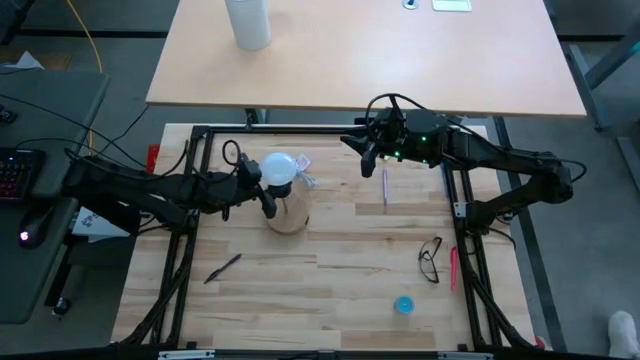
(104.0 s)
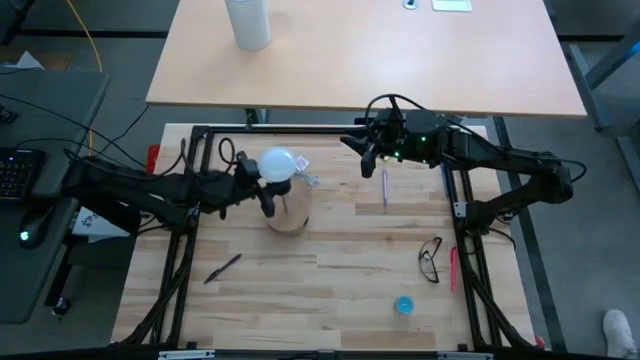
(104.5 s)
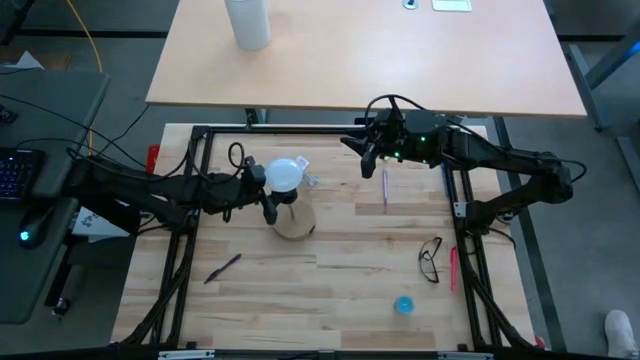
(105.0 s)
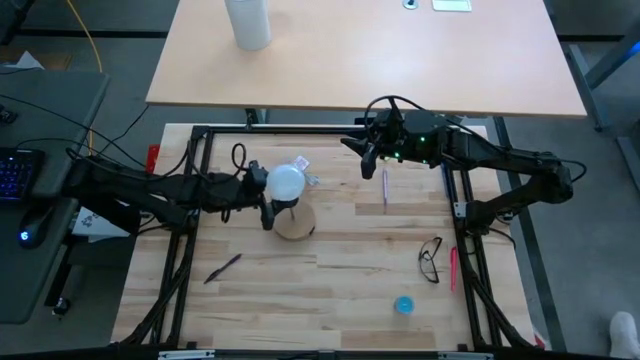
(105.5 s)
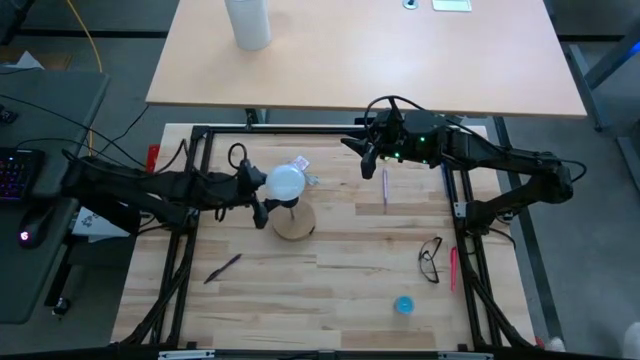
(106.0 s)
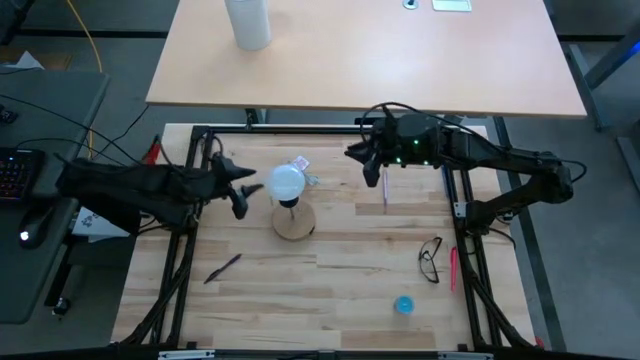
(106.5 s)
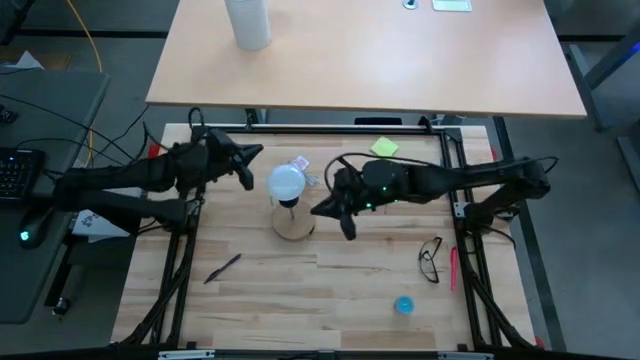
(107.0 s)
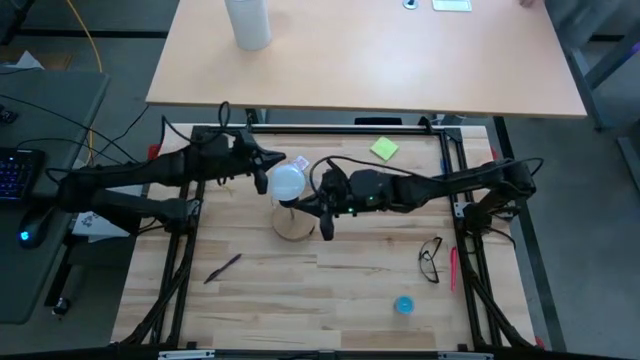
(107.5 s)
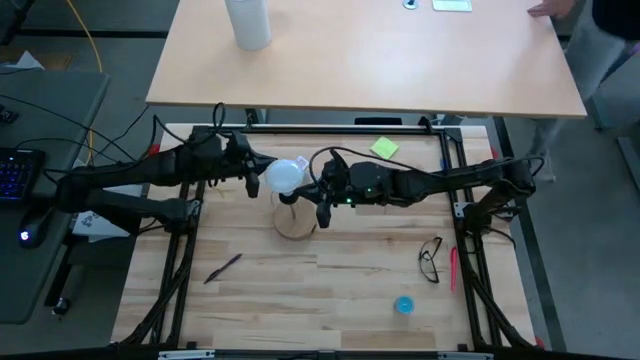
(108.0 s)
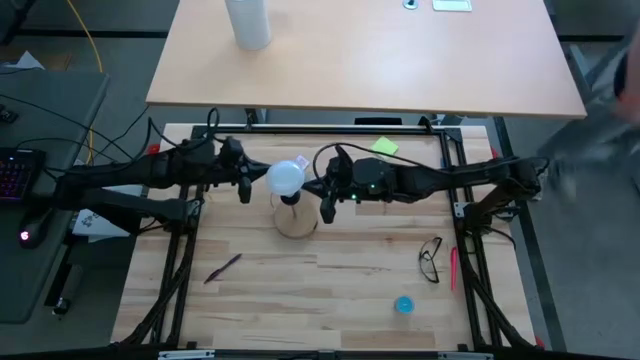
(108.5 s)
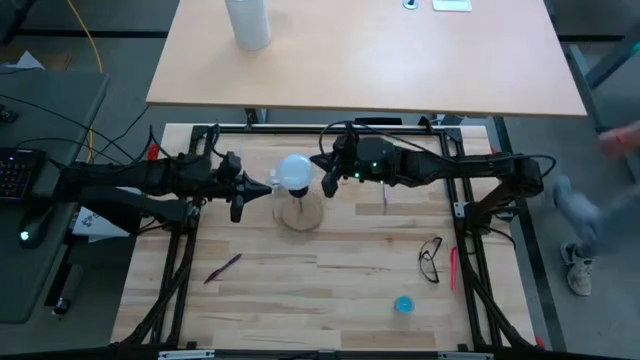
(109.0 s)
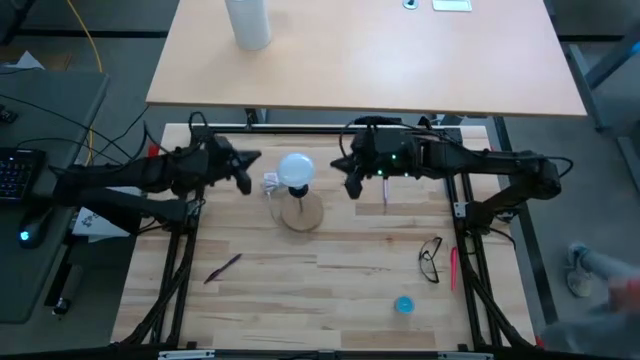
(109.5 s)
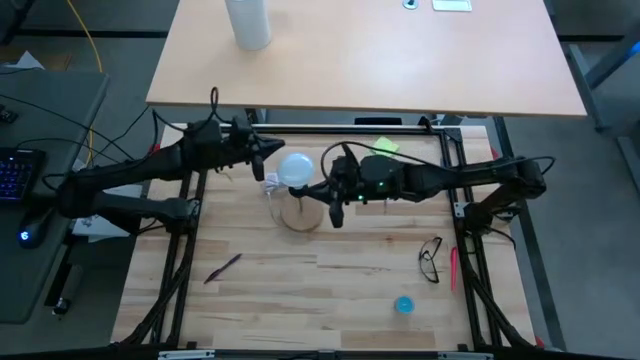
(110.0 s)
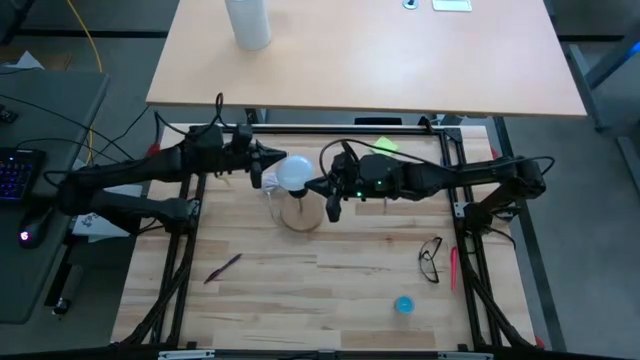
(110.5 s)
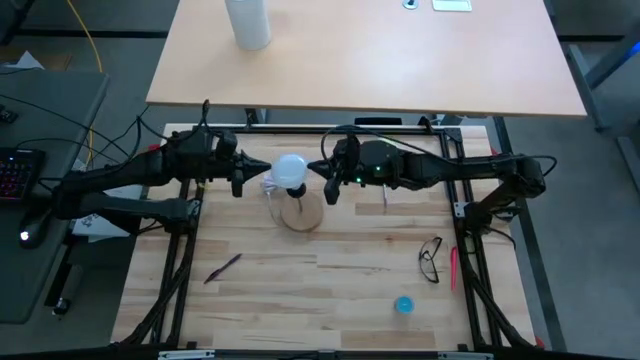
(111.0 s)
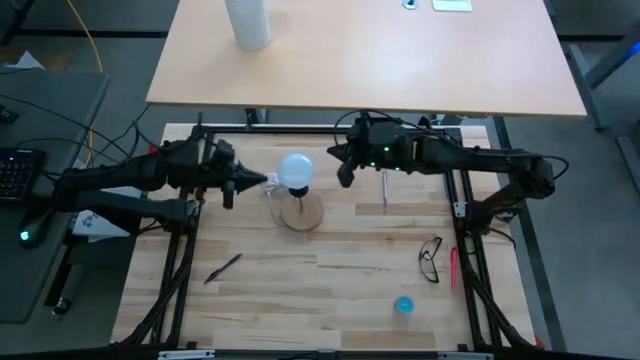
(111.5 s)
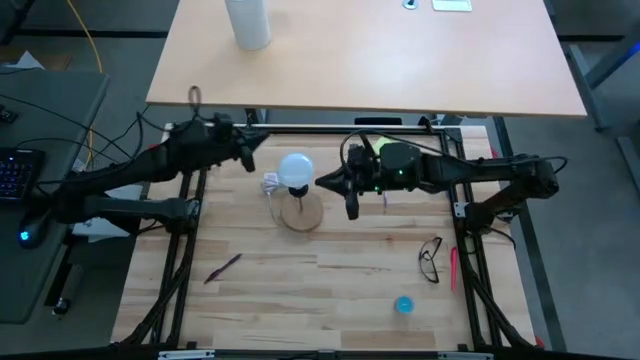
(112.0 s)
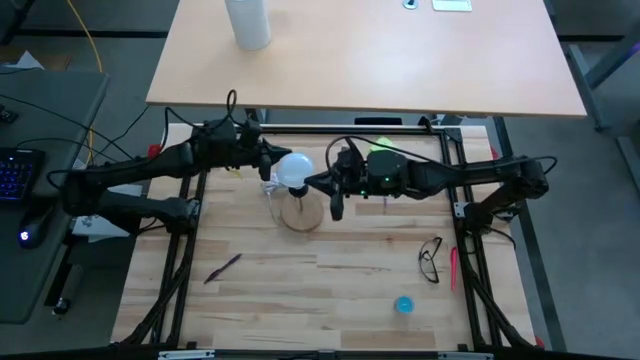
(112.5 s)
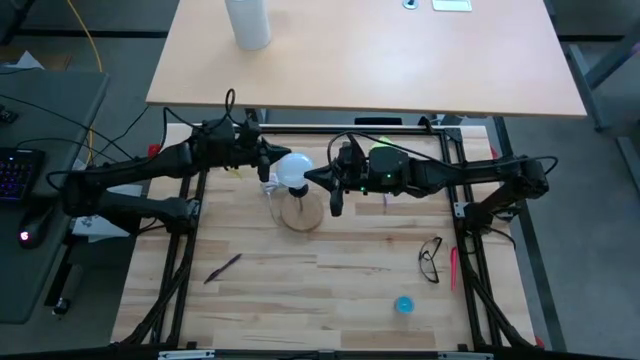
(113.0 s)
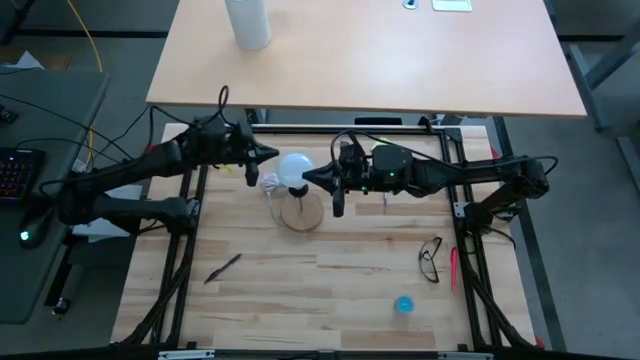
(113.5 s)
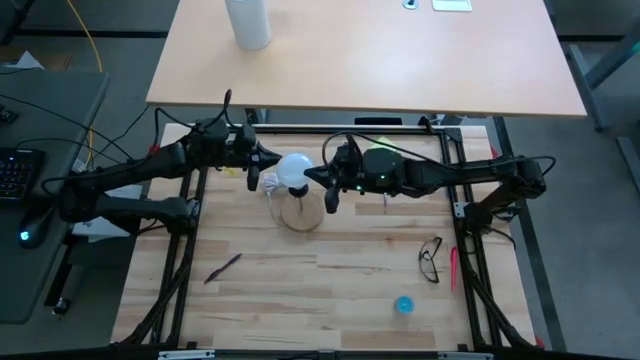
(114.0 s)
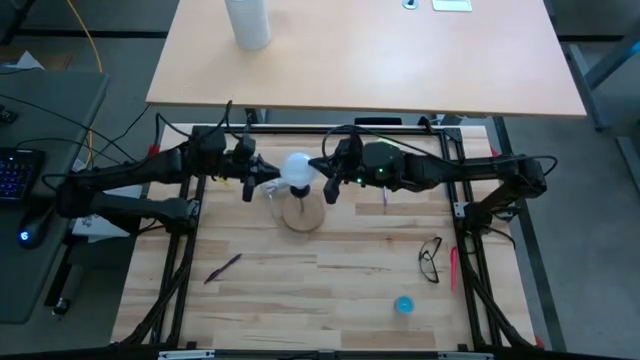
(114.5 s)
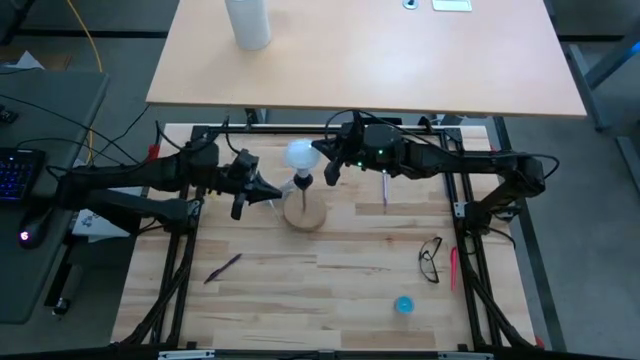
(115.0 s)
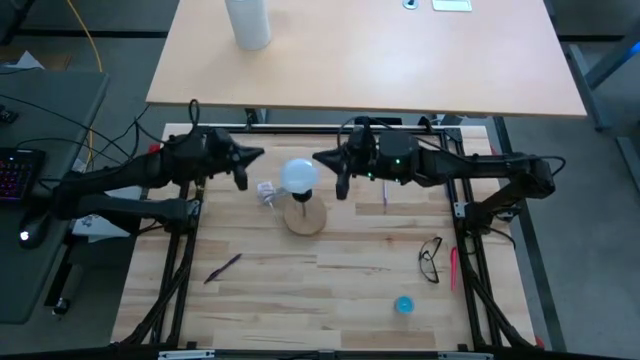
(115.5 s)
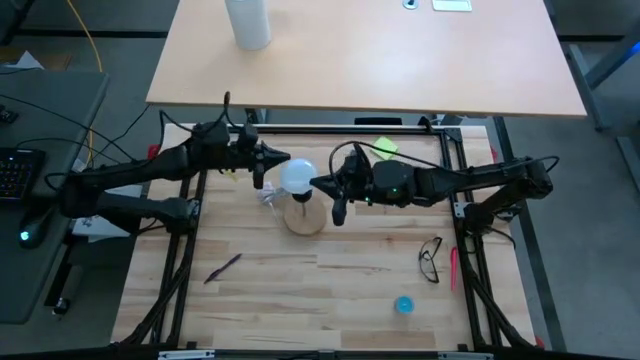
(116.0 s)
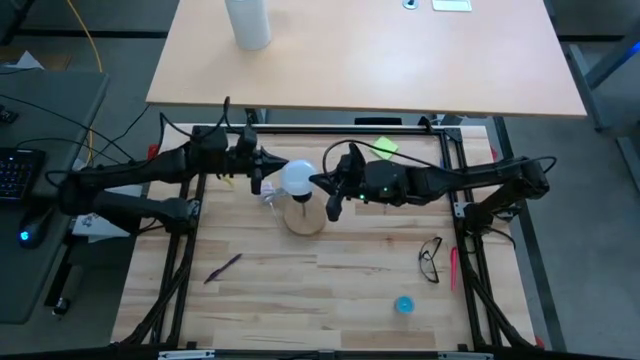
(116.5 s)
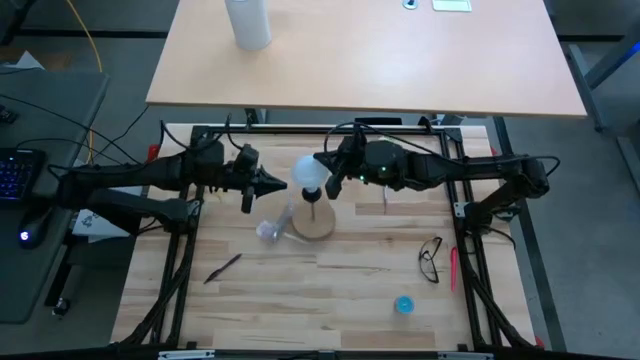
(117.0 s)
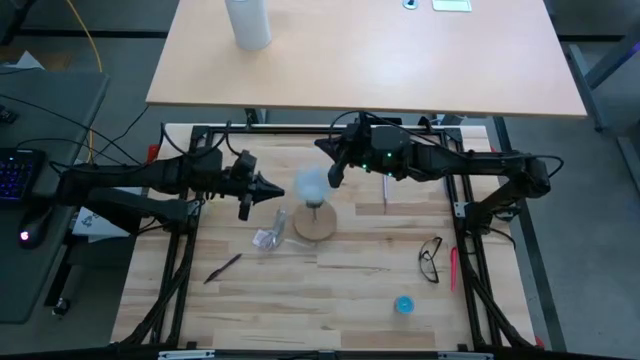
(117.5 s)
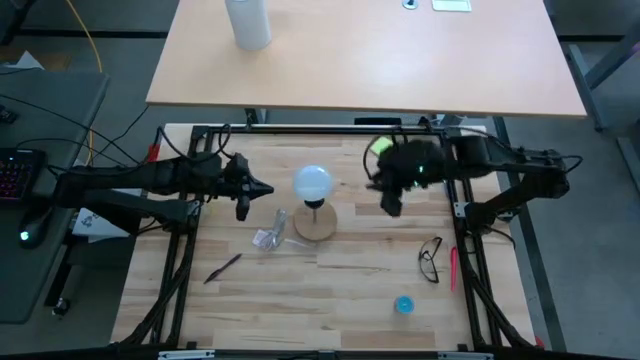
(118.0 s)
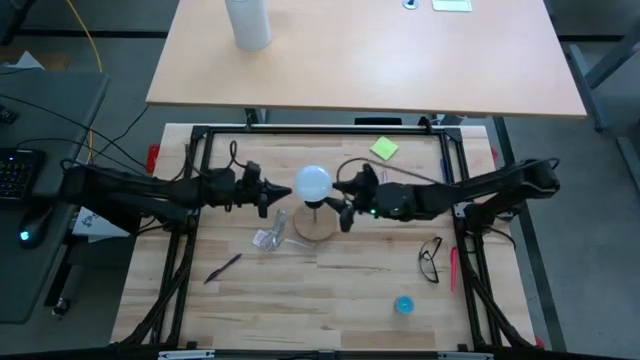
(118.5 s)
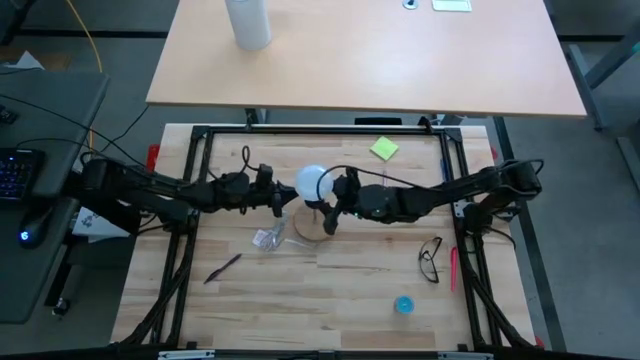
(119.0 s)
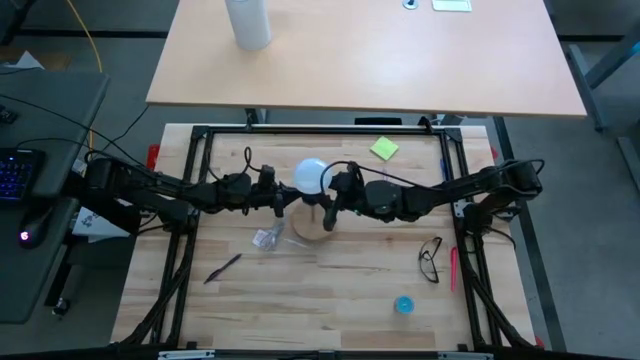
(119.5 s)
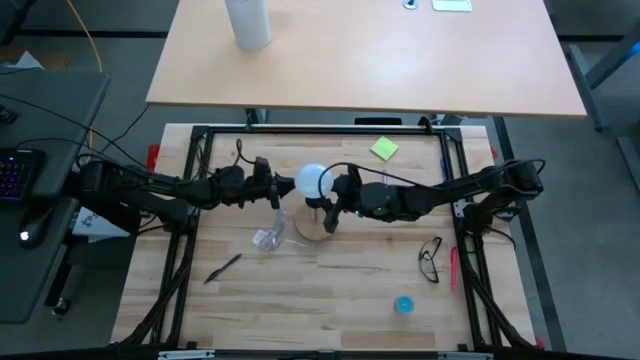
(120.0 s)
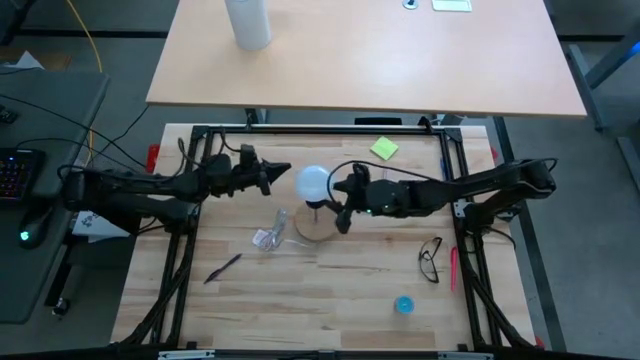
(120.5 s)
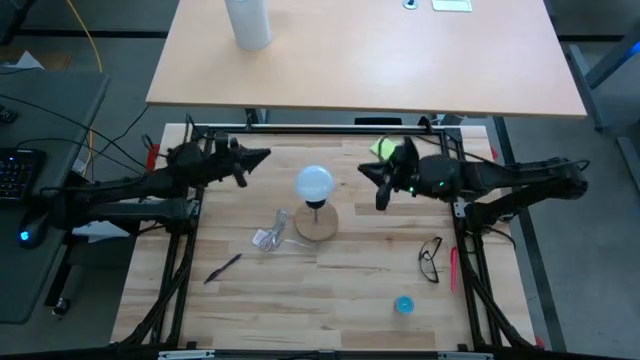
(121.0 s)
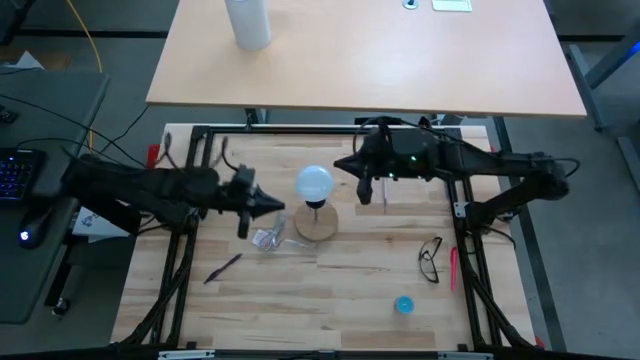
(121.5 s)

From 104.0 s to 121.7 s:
Task: Screw lightbulb
Remove the lightbulb from the lamp
